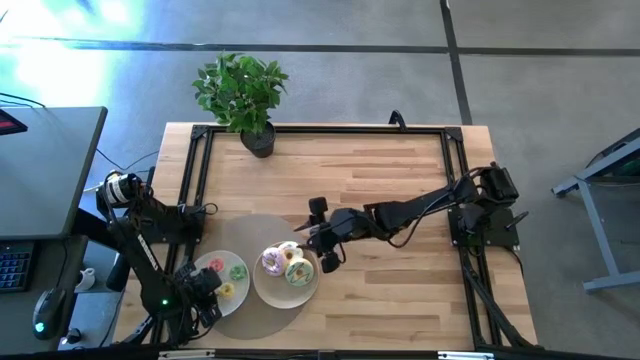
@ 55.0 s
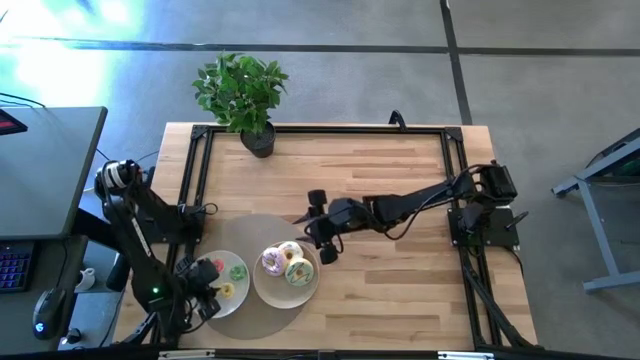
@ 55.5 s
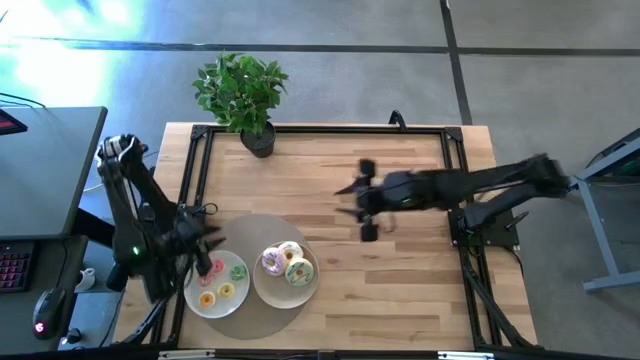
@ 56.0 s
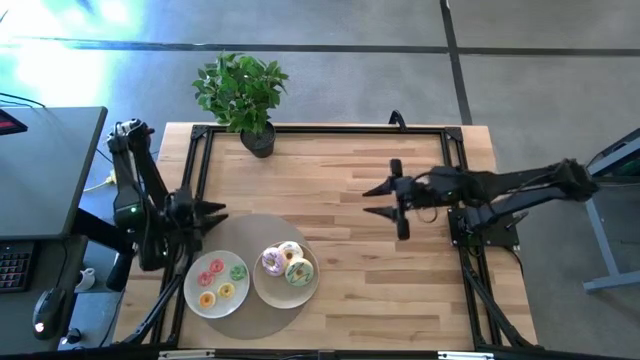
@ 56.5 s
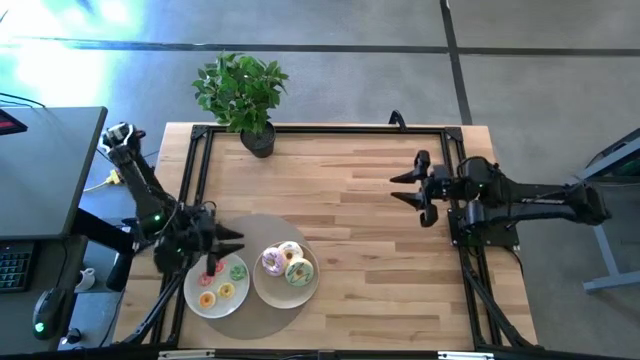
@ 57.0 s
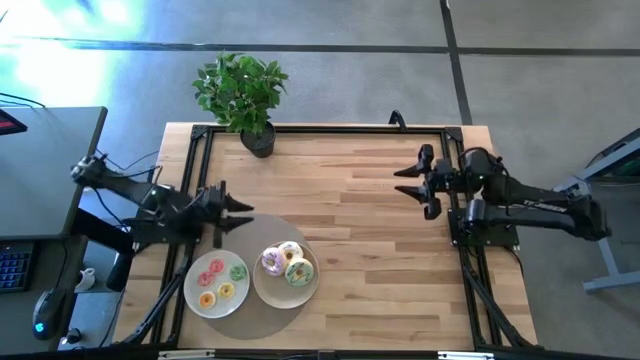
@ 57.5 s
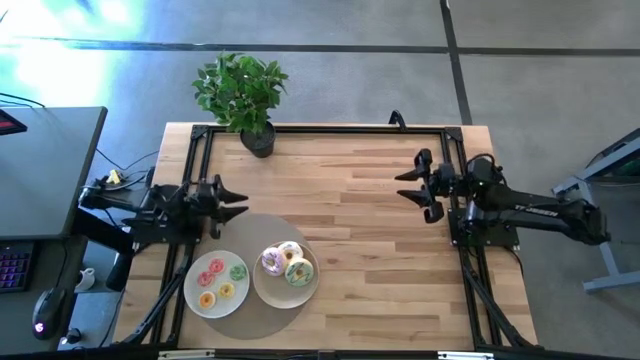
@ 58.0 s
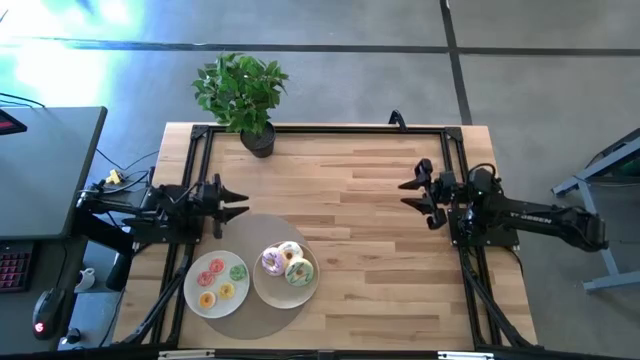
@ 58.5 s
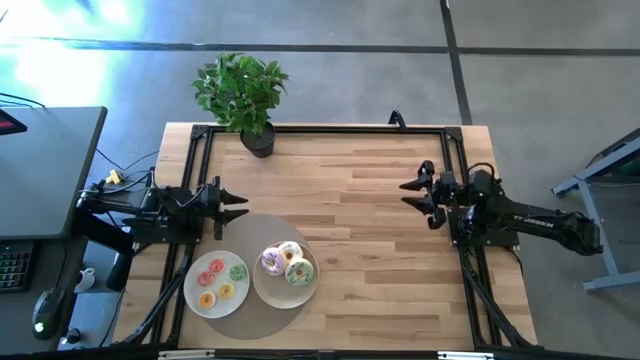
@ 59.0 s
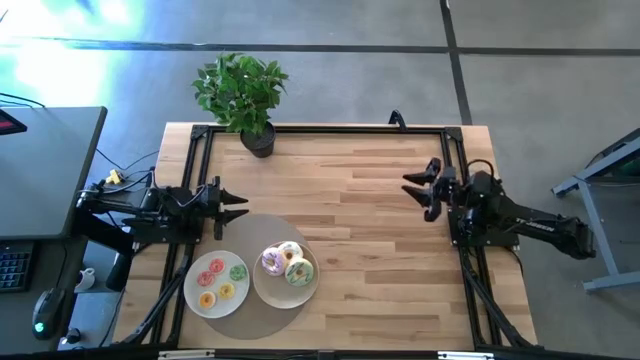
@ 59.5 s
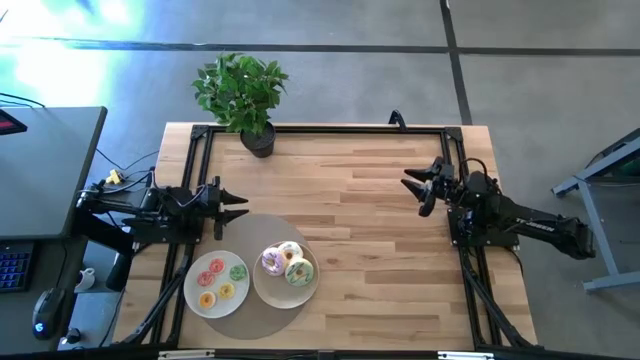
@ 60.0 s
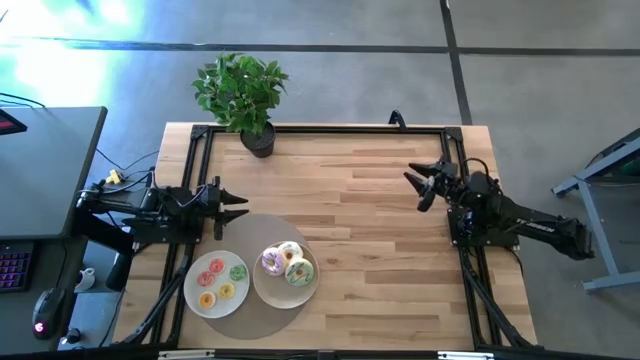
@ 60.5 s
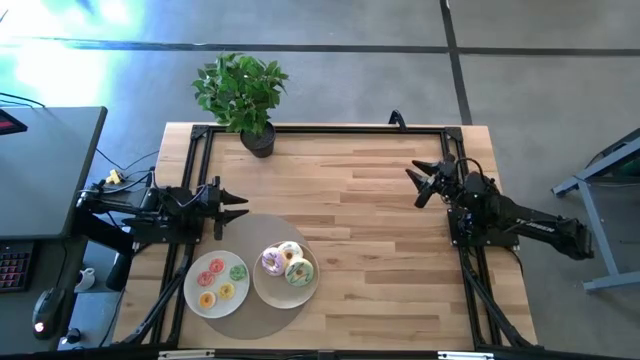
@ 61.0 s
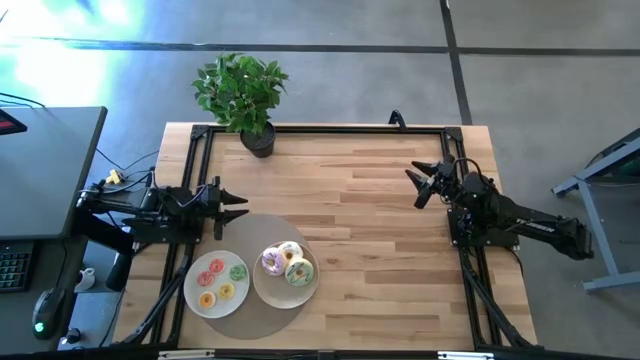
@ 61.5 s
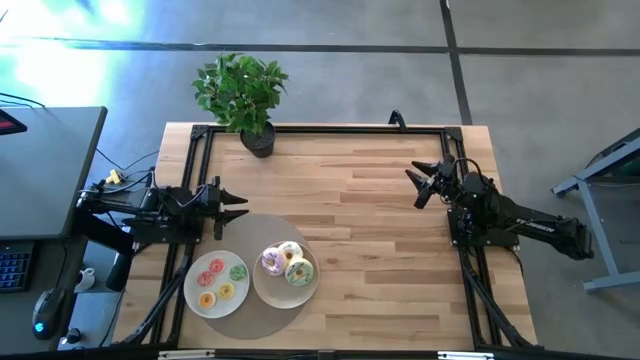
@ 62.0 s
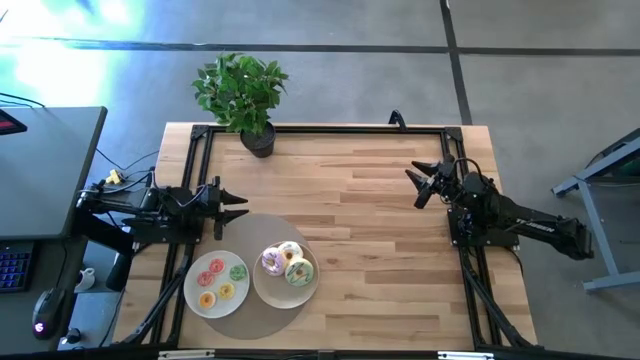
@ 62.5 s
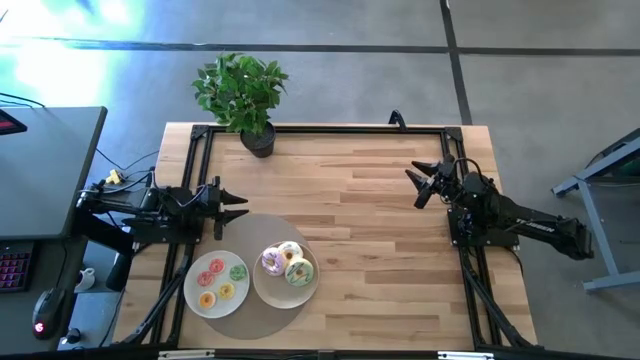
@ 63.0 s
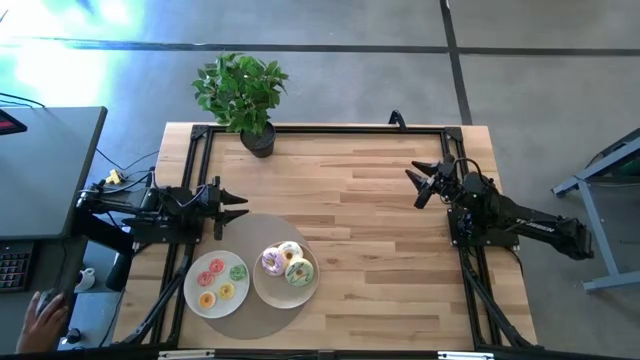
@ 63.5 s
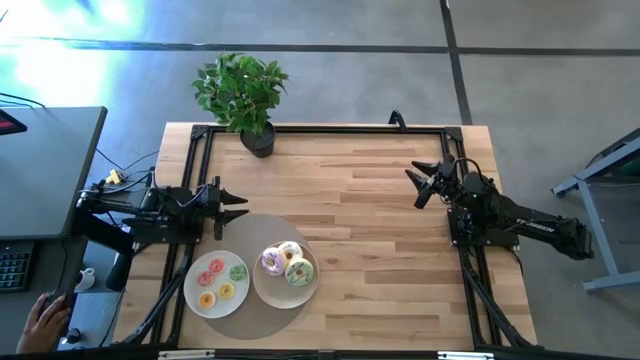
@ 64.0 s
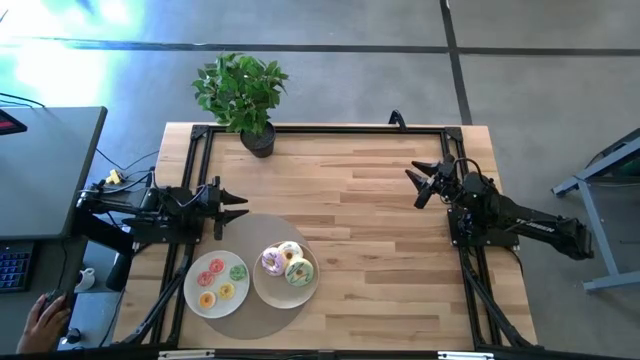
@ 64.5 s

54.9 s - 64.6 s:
Task: Pick & Place donuts
Return to Home Position

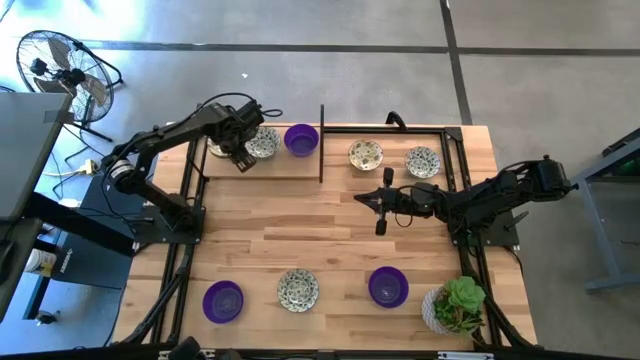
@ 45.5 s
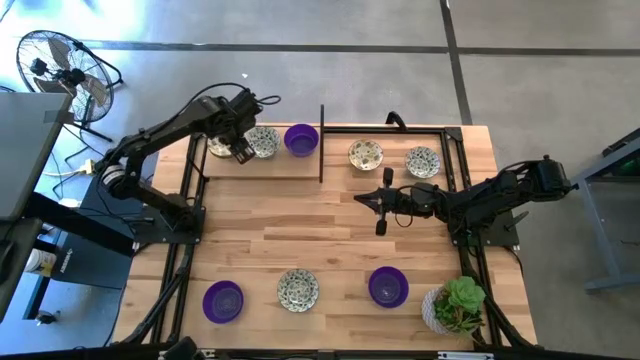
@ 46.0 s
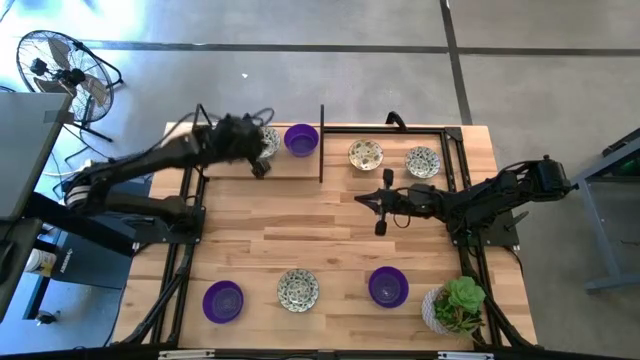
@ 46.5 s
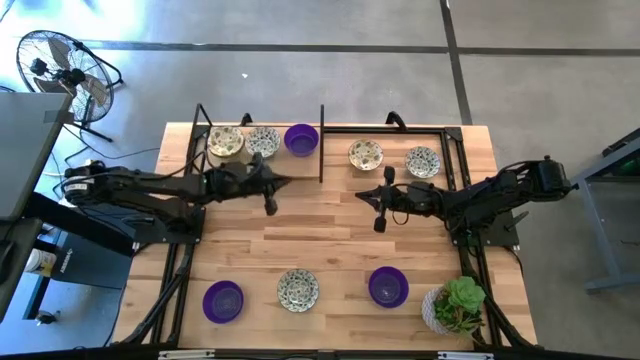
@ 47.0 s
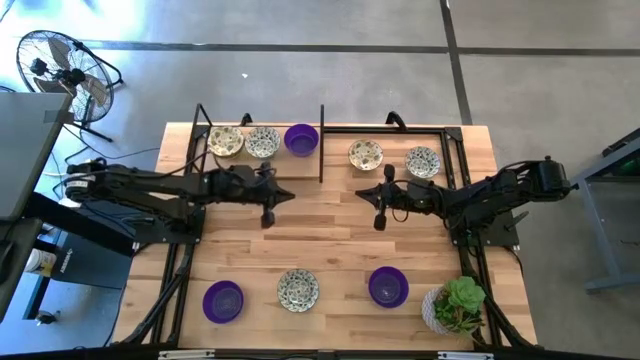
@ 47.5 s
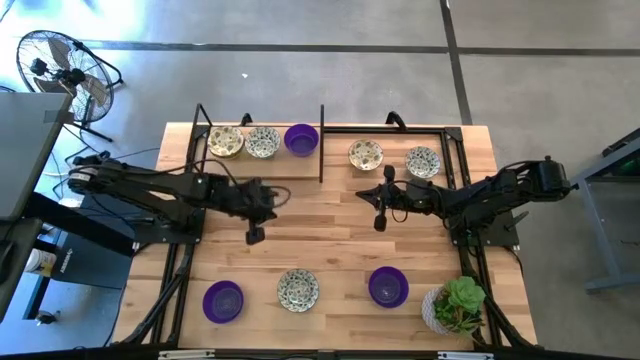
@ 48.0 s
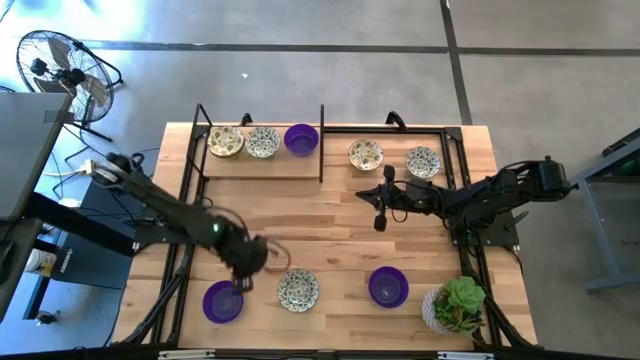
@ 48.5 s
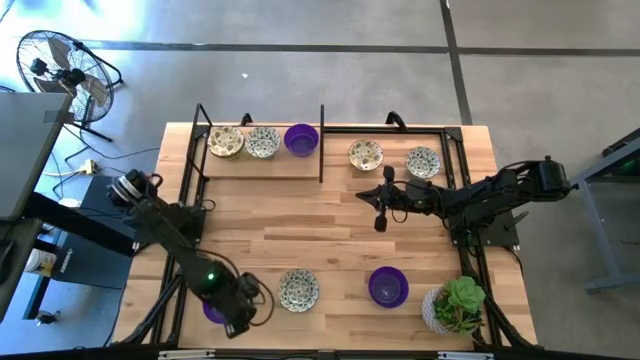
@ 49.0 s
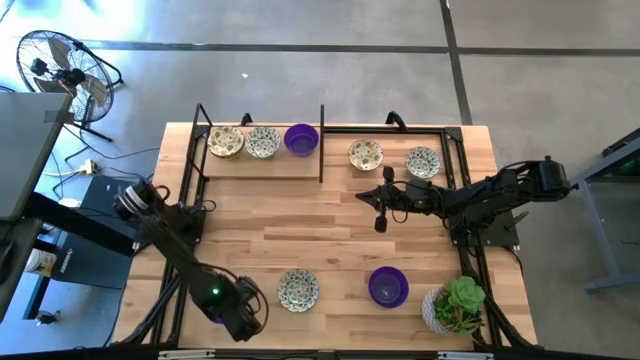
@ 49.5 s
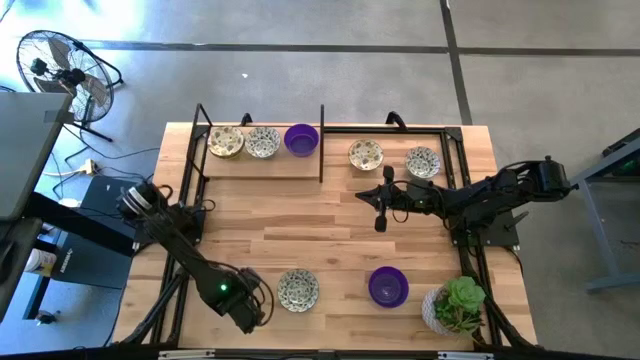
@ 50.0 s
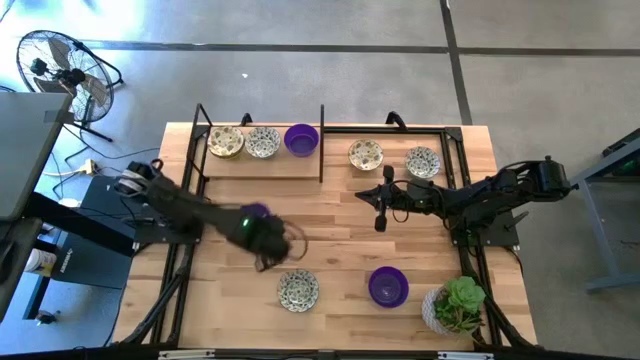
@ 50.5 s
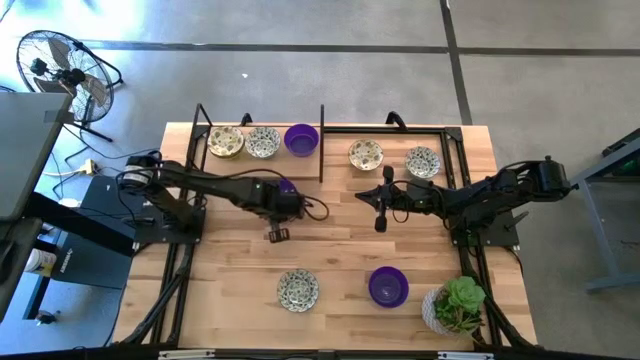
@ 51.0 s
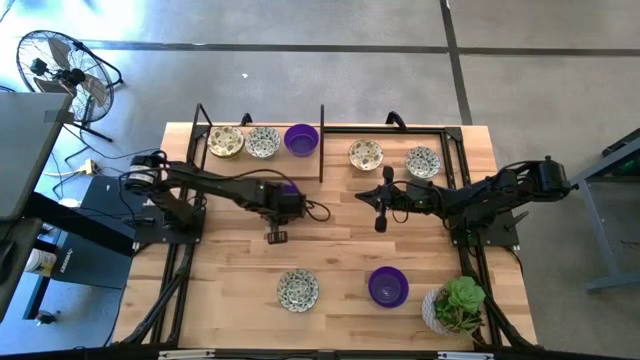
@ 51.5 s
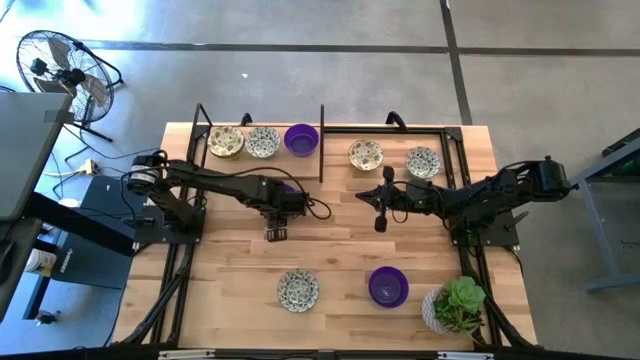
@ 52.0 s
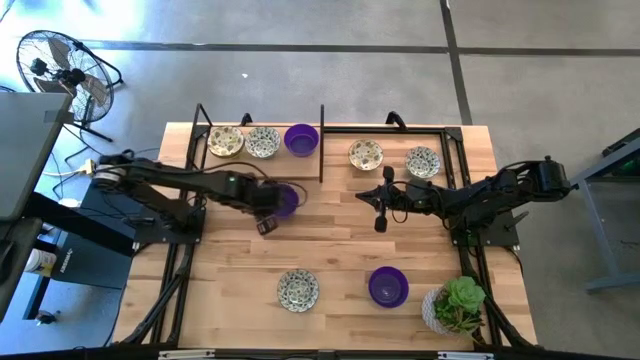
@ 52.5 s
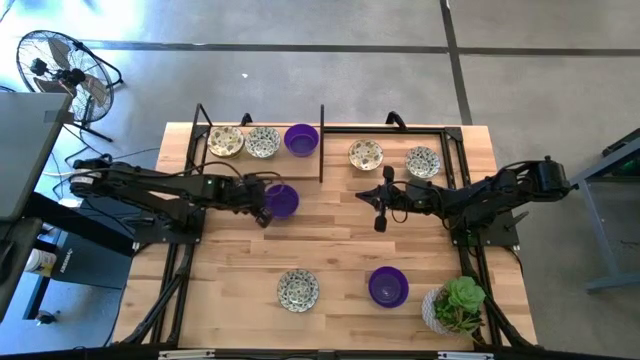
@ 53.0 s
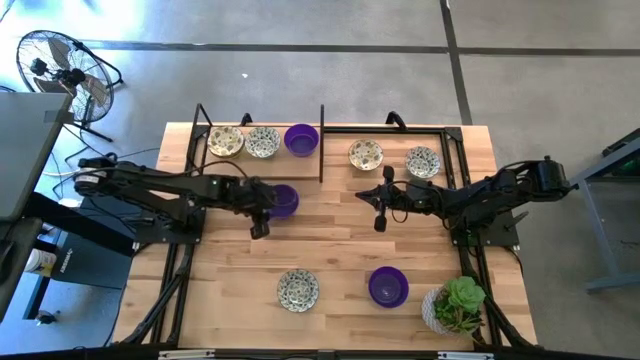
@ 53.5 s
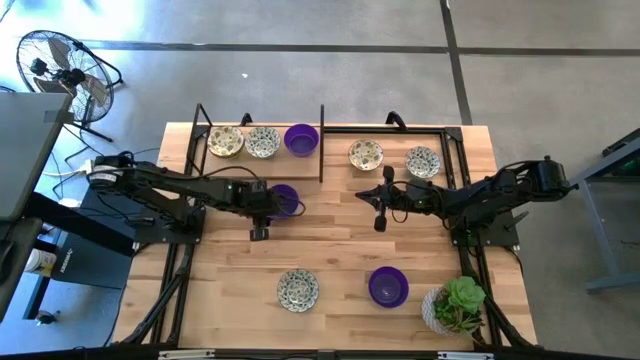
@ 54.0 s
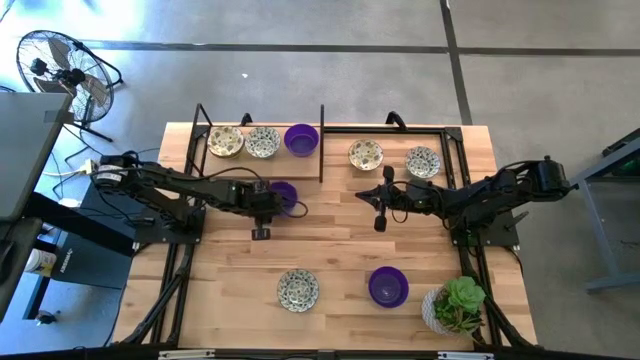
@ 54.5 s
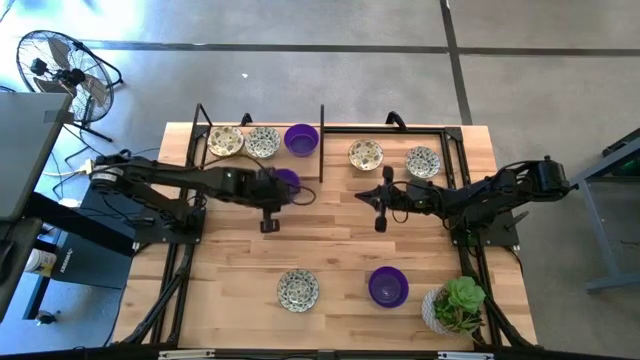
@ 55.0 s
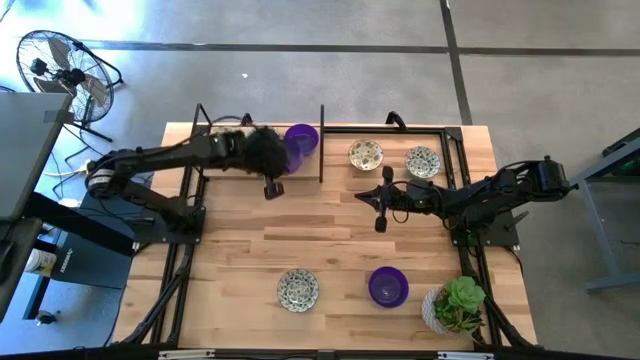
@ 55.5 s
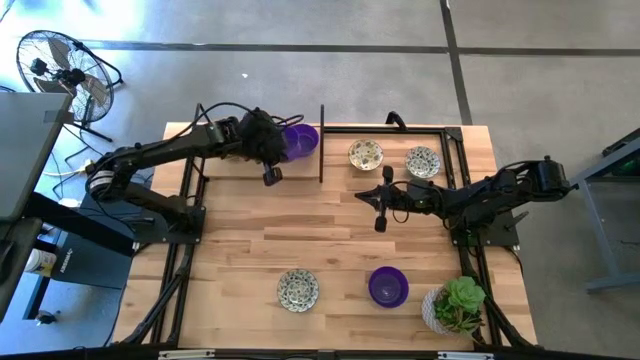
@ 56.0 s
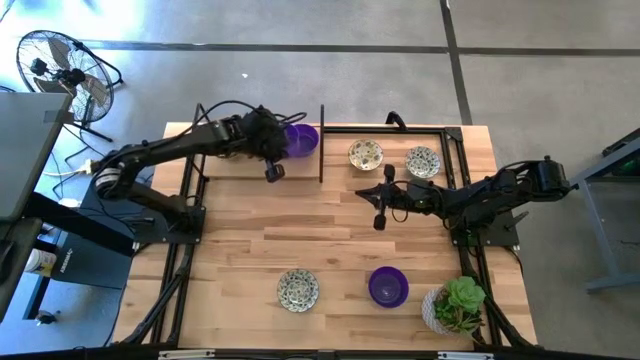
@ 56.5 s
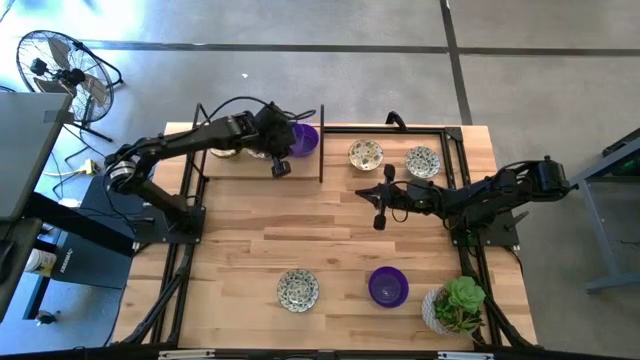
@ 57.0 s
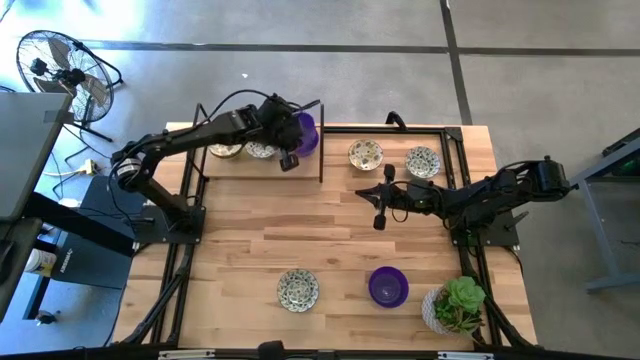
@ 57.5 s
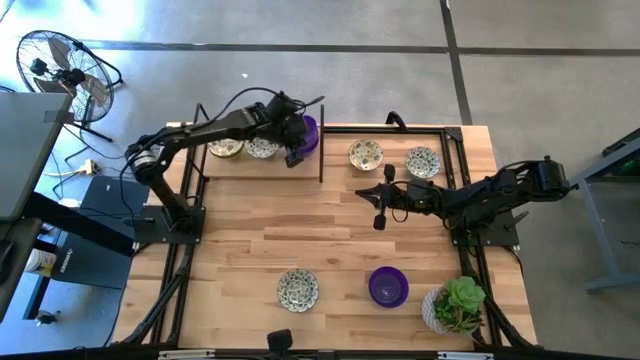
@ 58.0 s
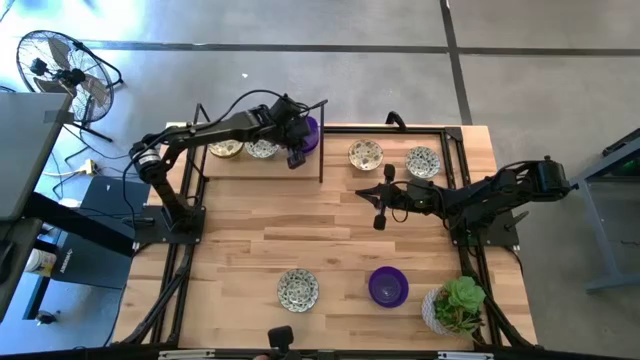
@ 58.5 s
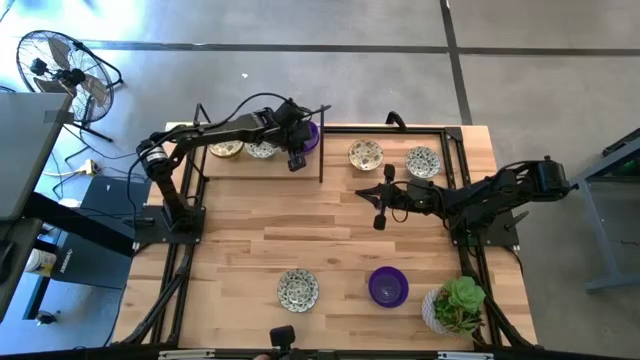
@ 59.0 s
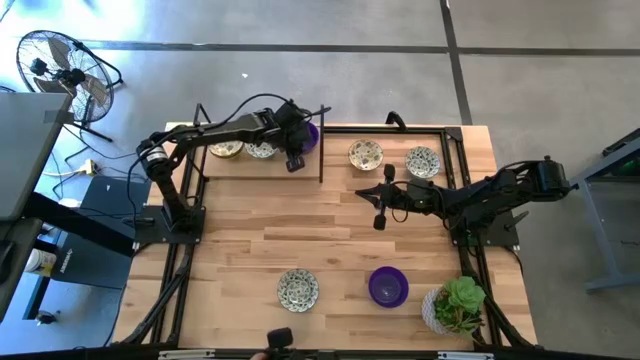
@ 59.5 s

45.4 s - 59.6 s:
Task: Pick & Place Mini bowls
Stack the left violet bowl on top of the other violet bowl on the shelf
